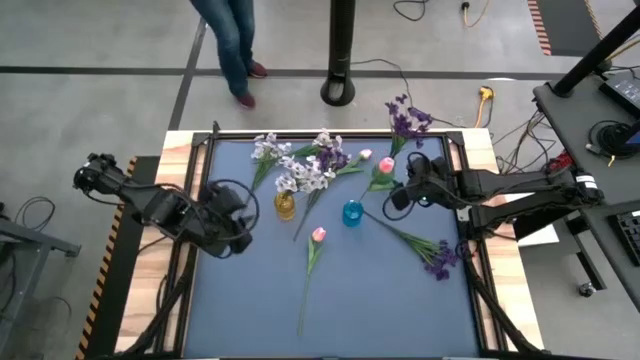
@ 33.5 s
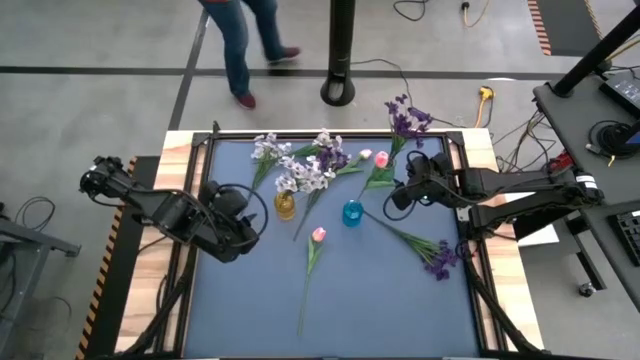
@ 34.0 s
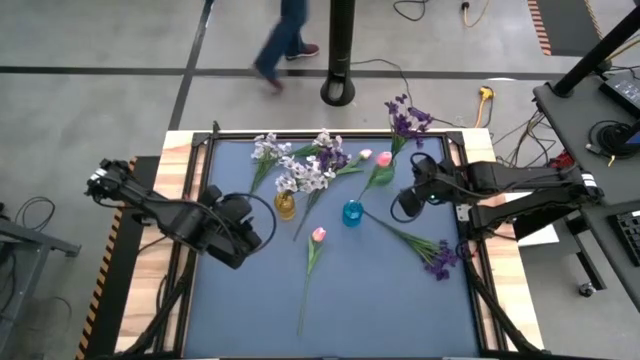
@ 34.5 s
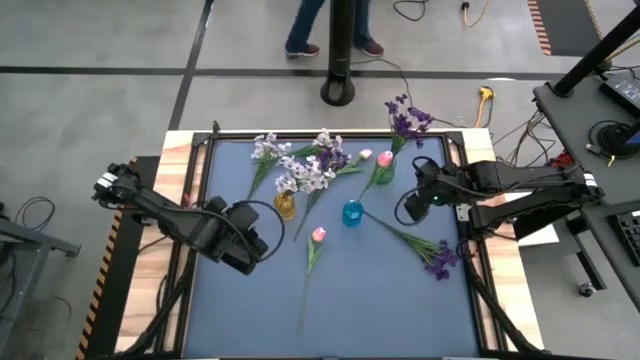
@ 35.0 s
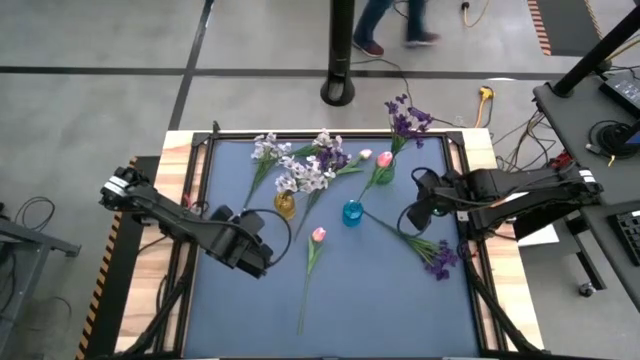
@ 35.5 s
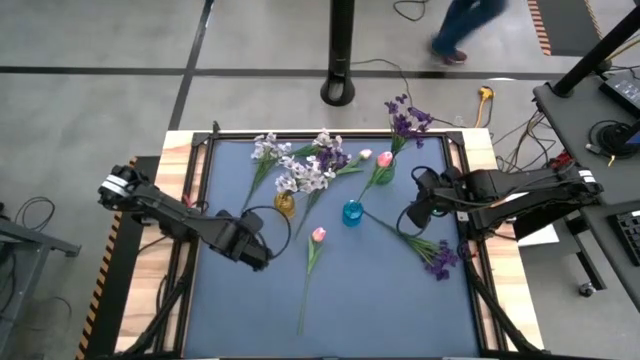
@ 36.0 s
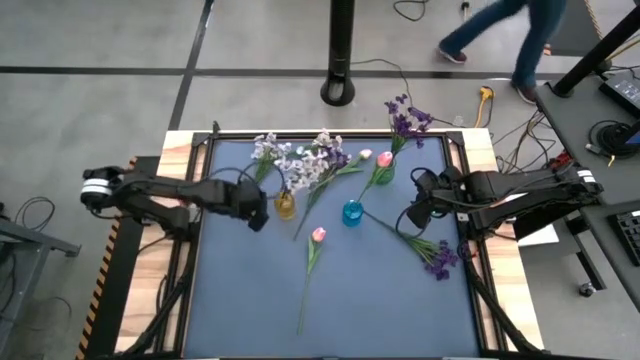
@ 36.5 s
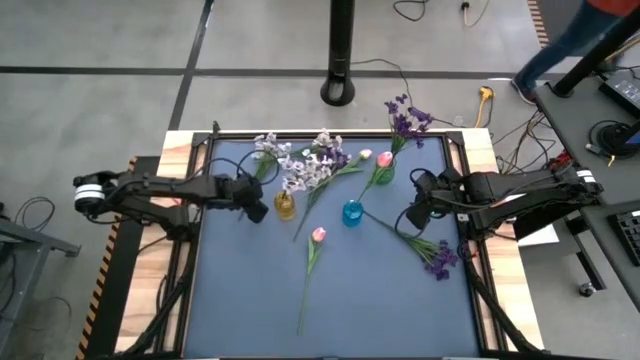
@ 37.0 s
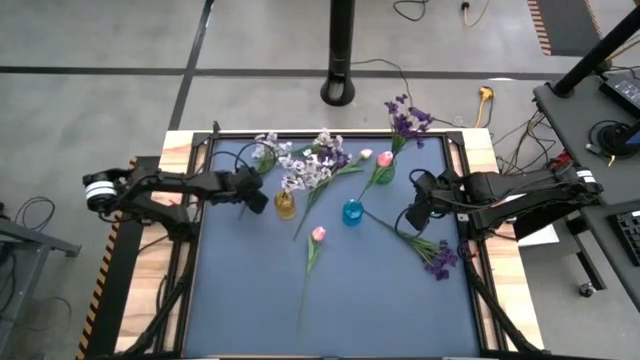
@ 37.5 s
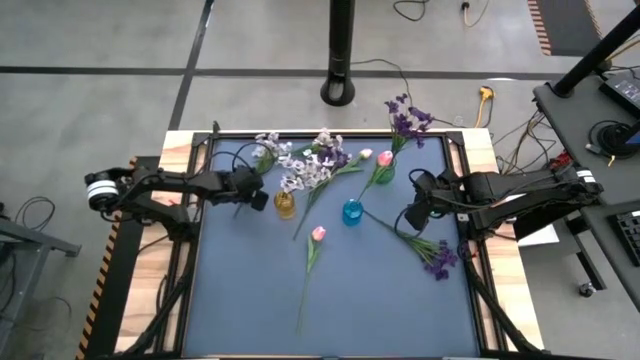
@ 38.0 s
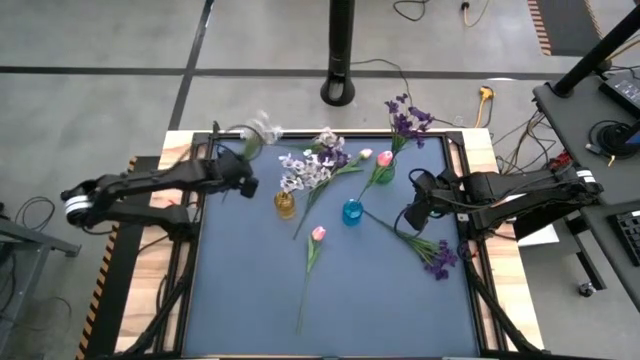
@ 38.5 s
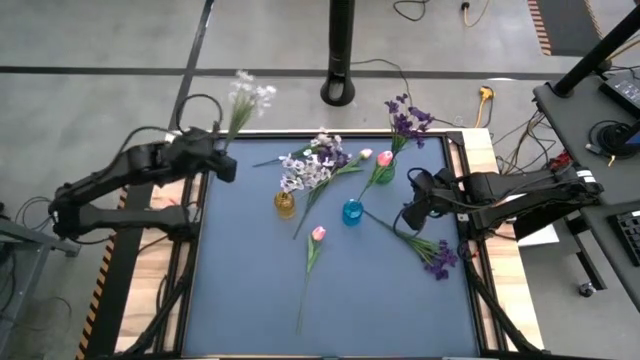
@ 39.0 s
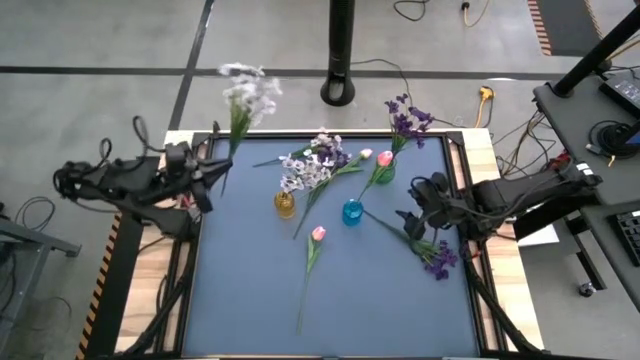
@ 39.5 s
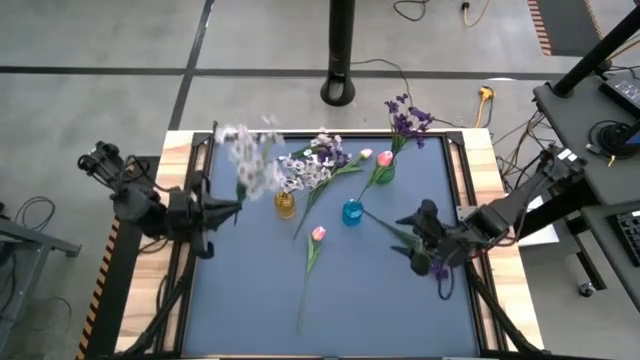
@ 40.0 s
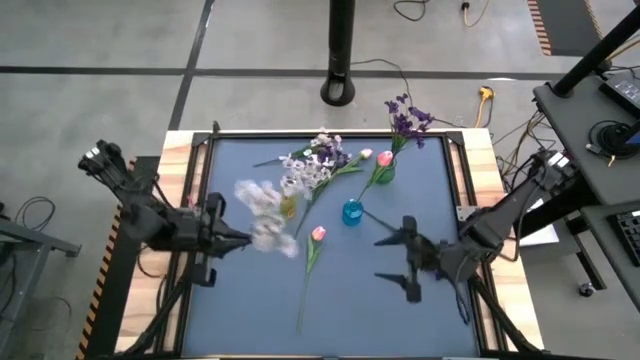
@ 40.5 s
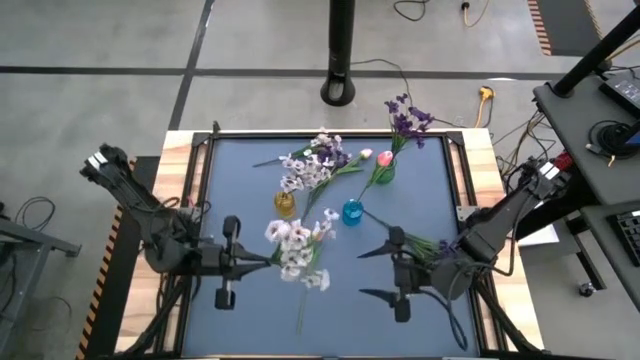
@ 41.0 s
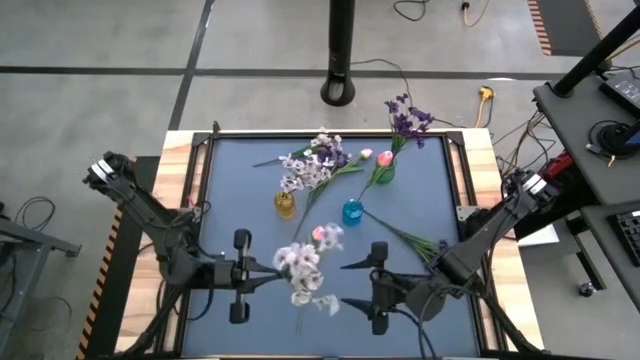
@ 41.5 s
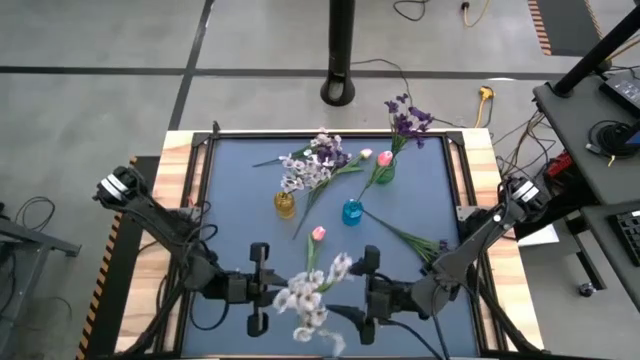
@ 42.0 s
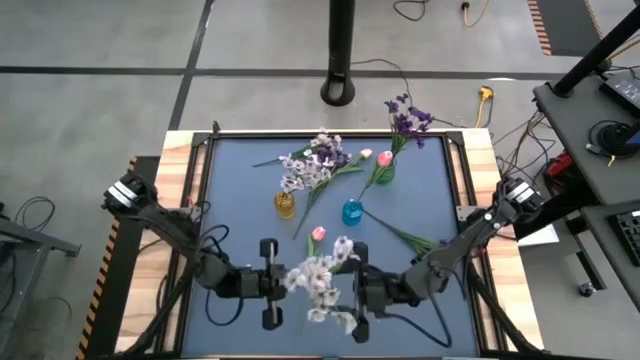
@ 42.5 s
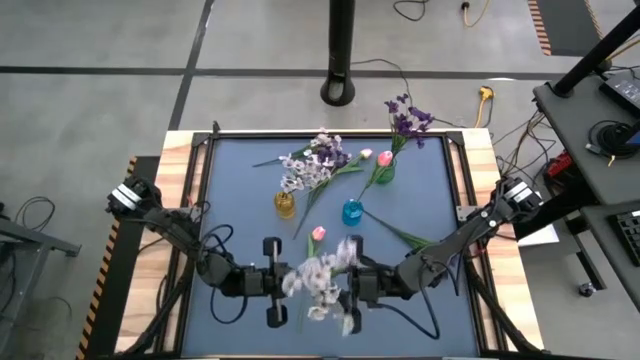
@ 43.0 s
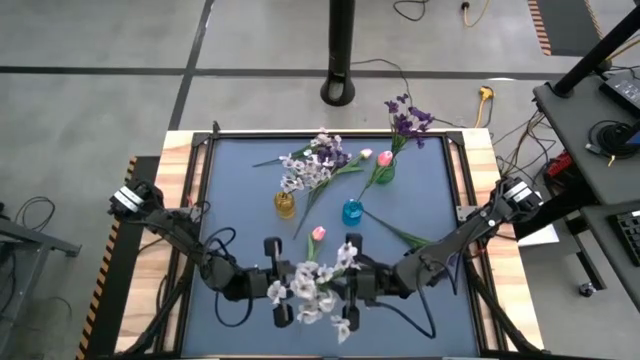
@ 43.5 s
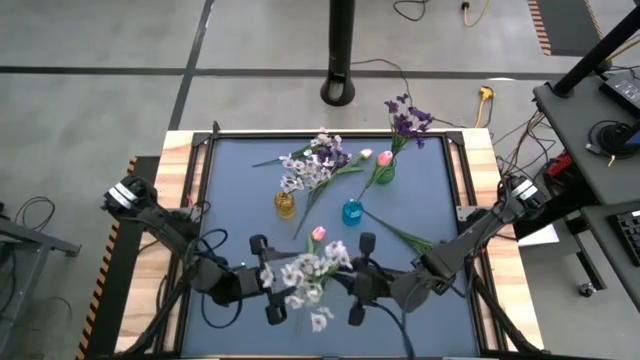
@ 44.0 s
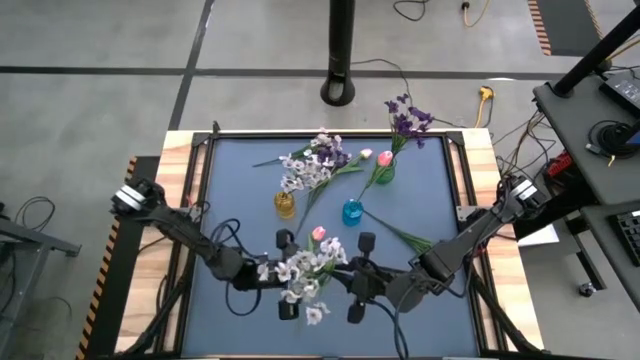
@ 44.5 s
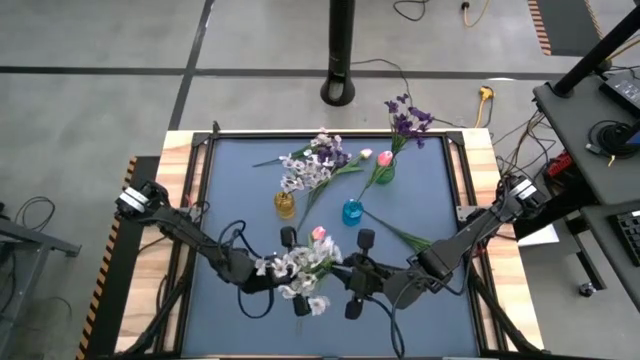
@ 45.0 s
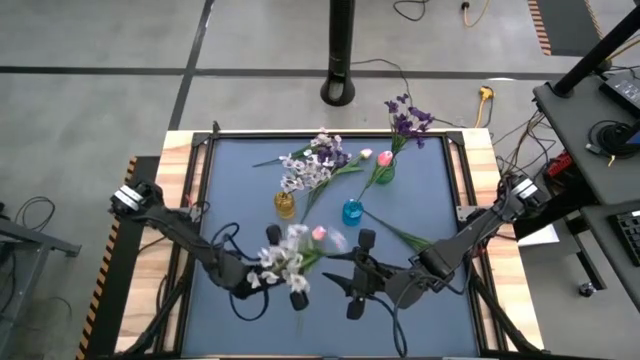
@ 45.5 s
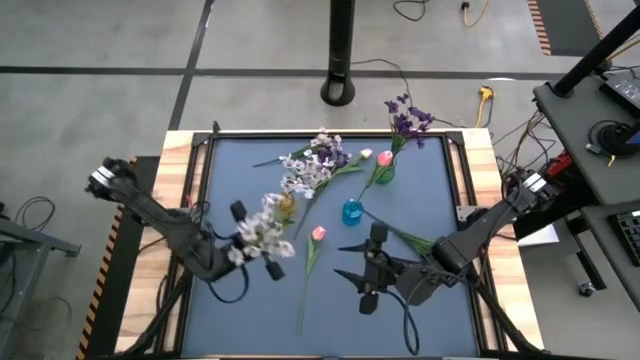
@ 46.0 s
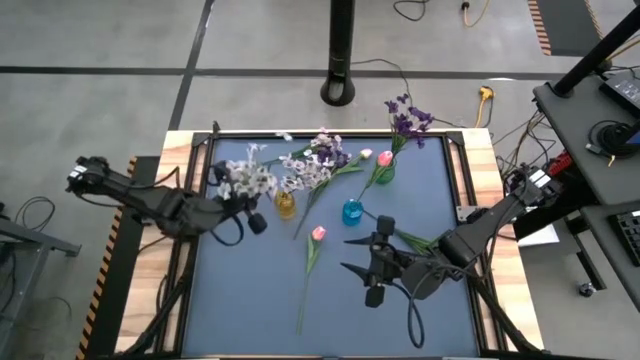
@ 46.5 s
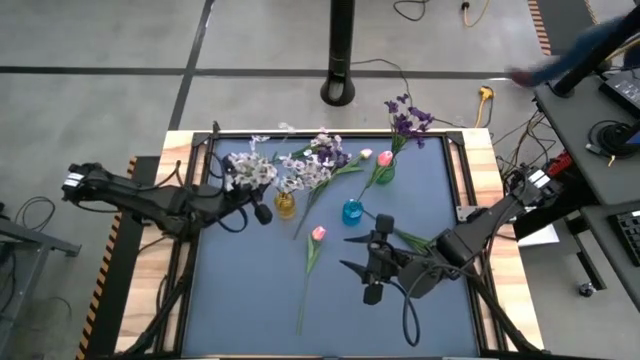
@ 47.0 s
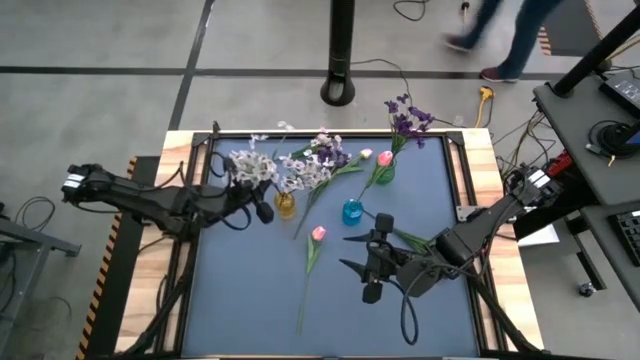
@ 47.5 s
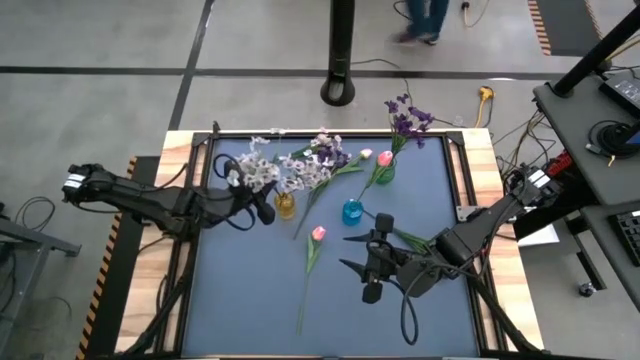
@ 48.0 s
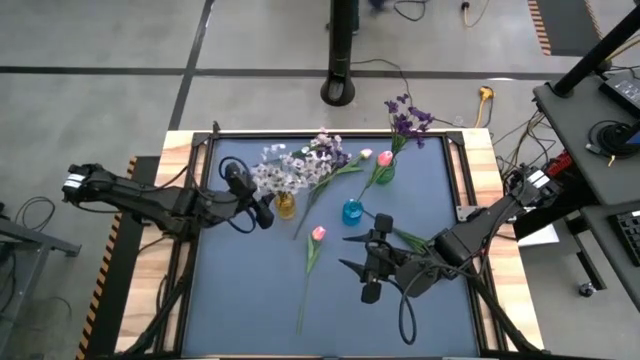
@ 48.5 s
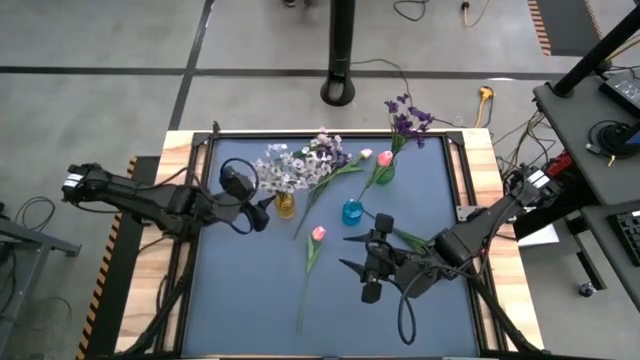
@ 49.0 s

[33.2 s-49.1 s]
Task: Sort flowers into vase by color
Put the left white flowers into the yellow flower vase

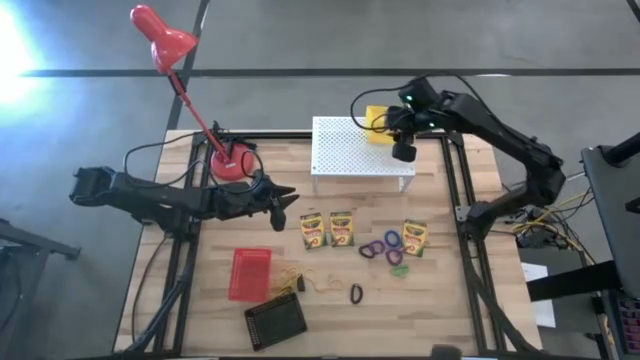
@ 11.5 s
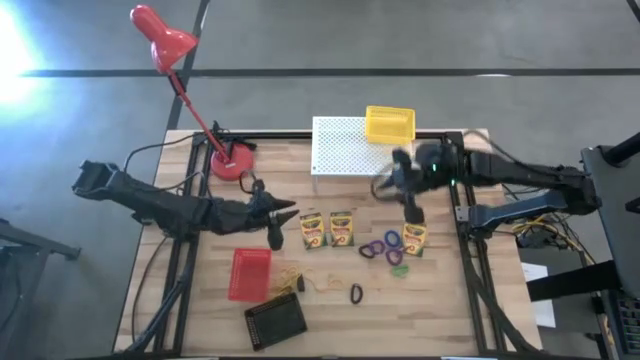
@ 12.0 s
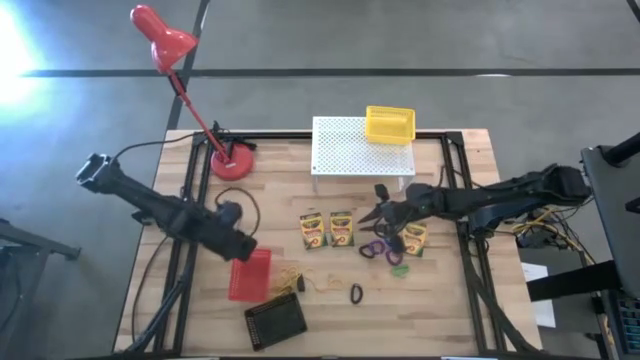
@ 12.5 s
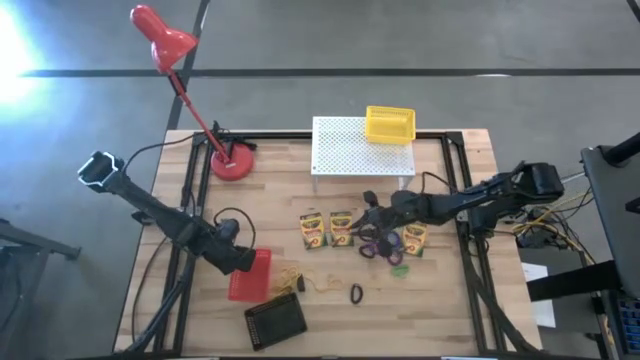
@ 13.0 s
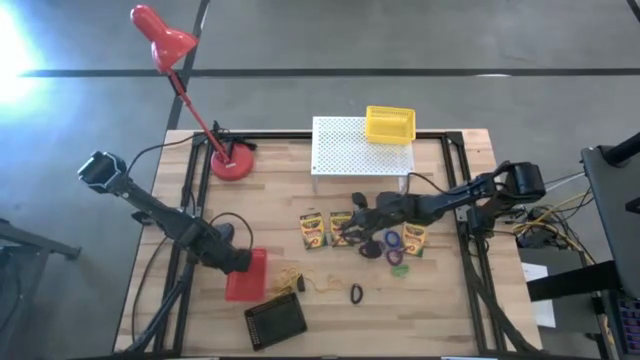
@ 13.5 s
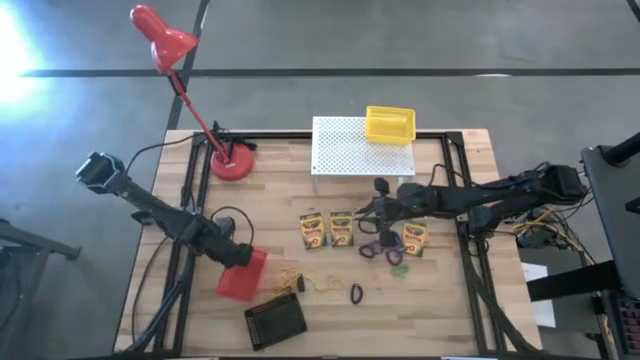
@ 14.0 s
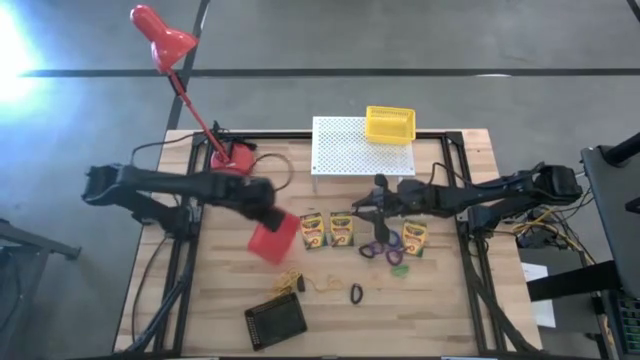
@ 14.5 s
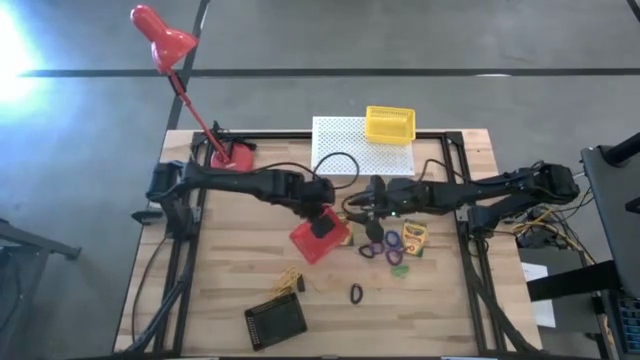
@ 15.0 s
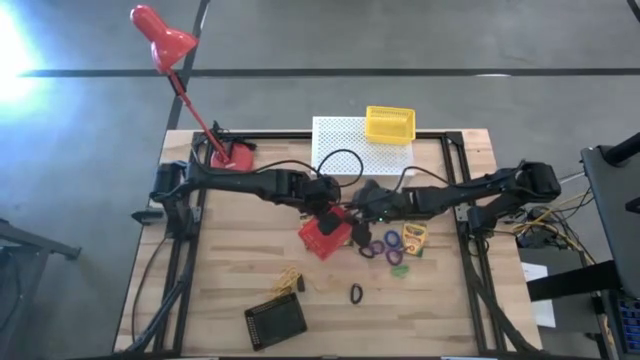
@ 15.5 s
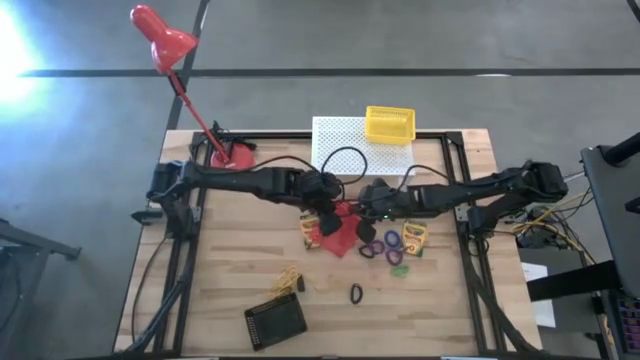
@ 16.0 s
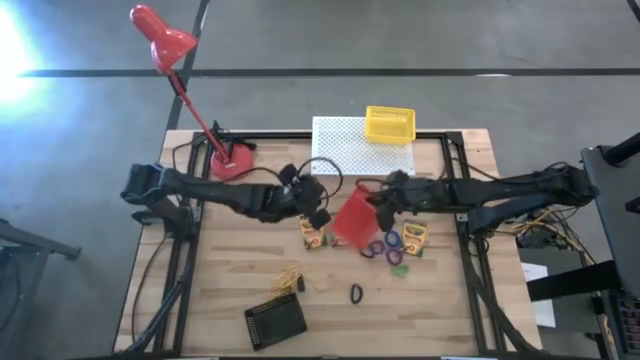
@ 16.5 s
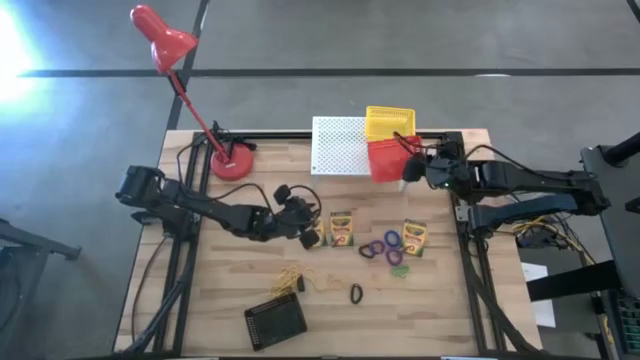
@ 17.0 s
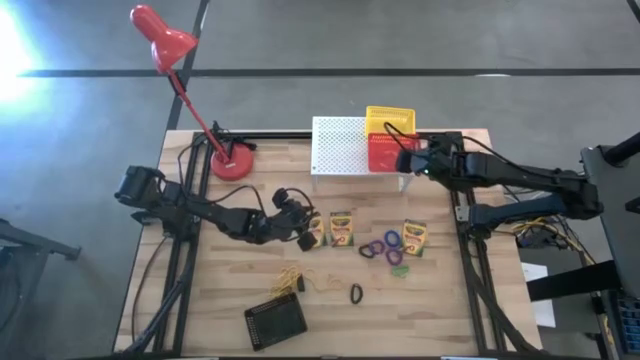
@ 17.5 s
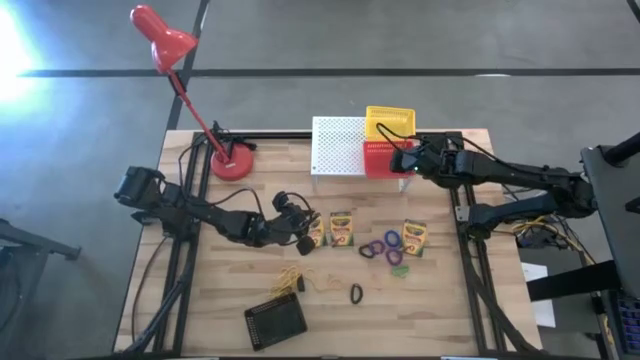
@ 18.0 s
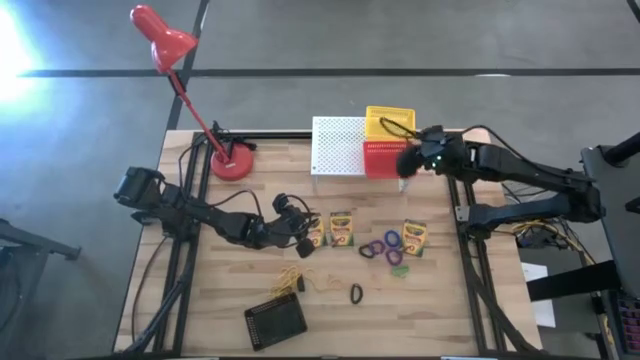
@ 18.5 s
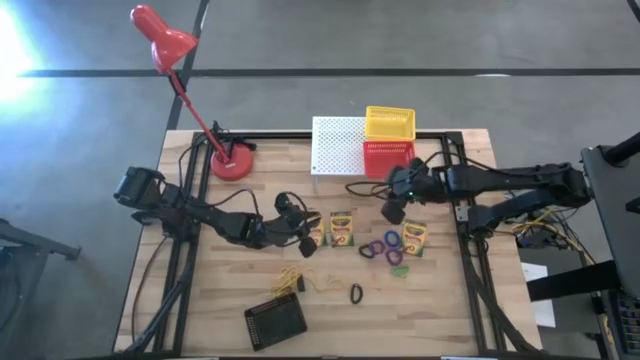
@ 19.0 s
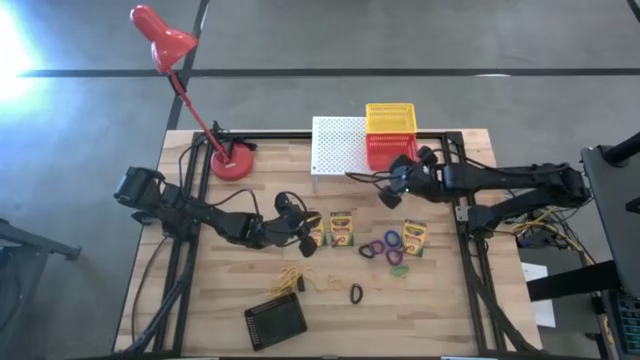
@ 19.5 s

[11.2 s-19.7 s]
Task: Pick & Place Office Desk Supplies
Put the red basket on the shelf
